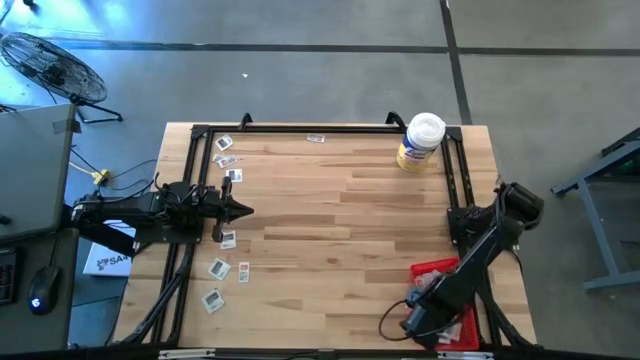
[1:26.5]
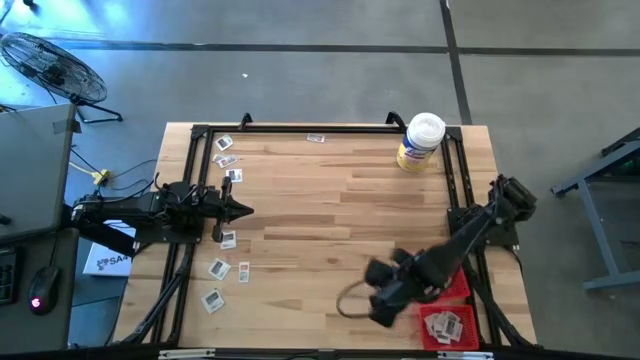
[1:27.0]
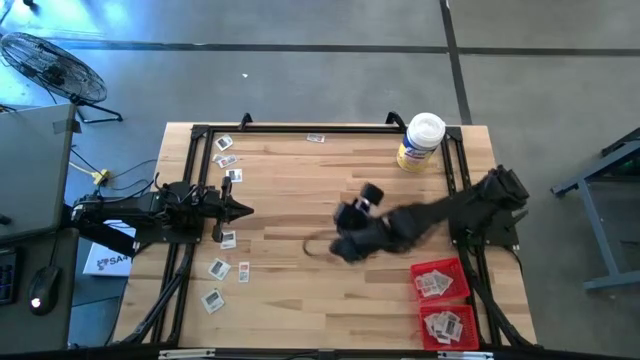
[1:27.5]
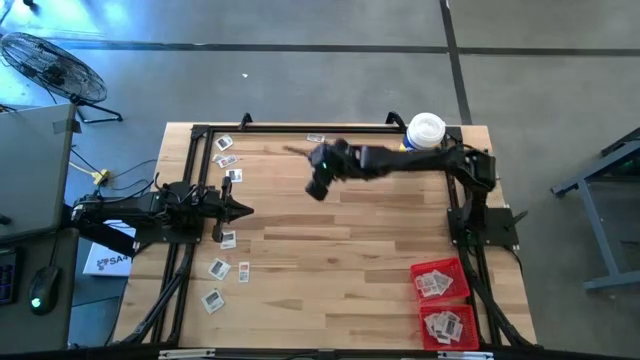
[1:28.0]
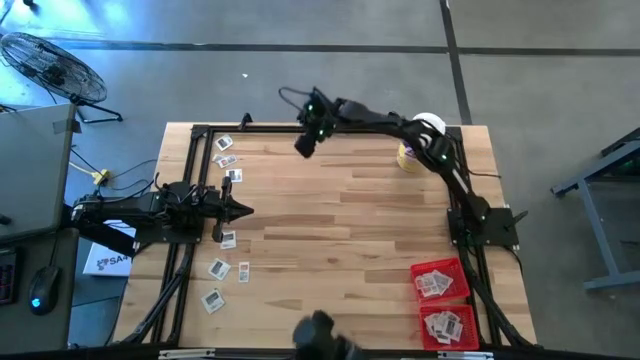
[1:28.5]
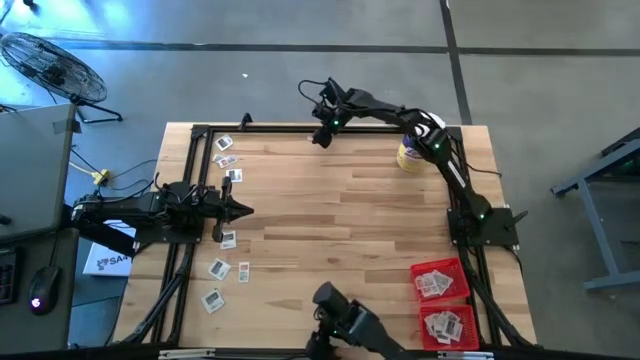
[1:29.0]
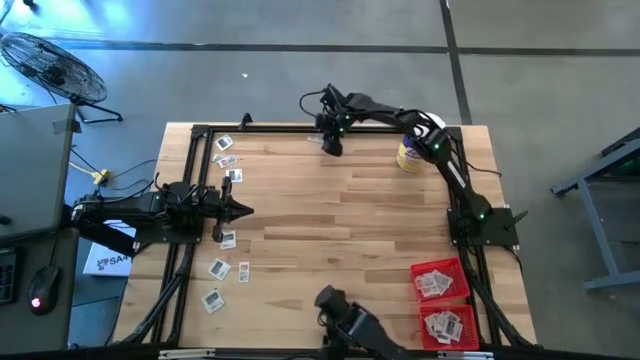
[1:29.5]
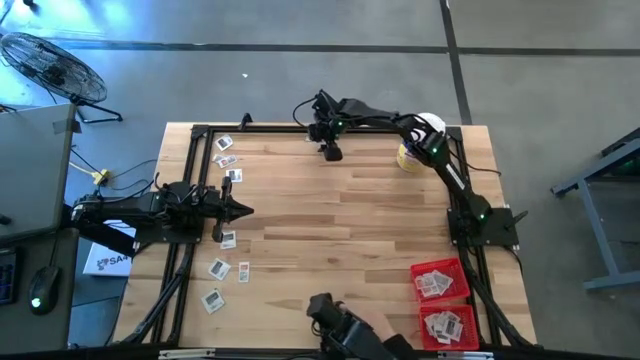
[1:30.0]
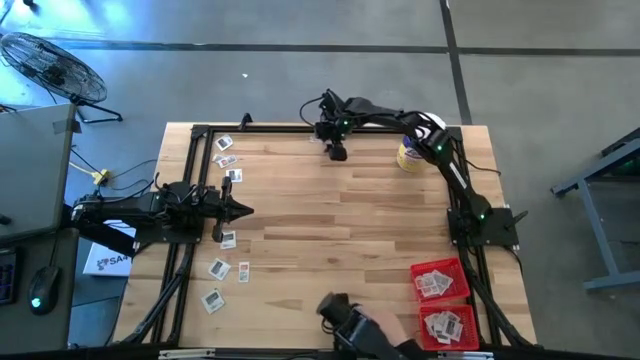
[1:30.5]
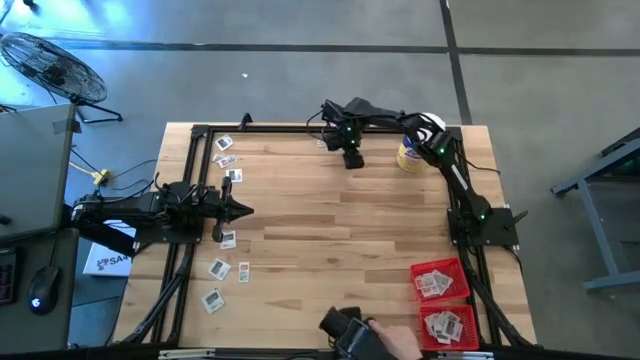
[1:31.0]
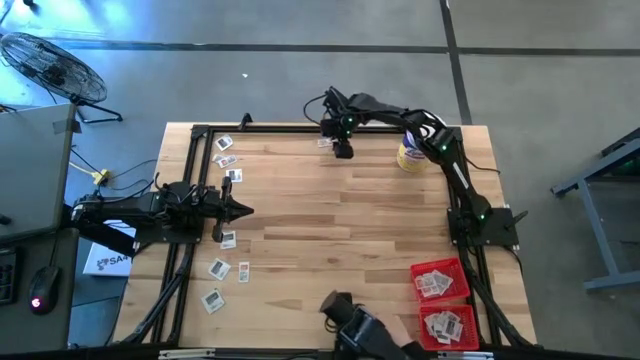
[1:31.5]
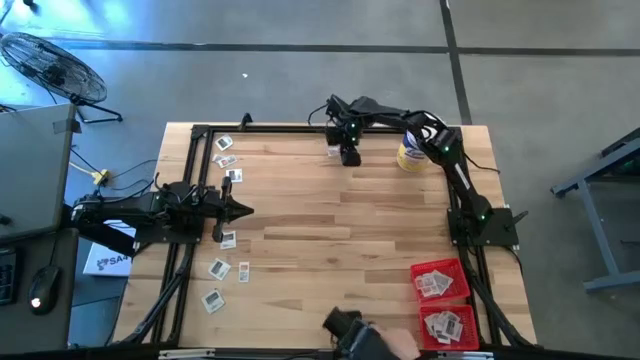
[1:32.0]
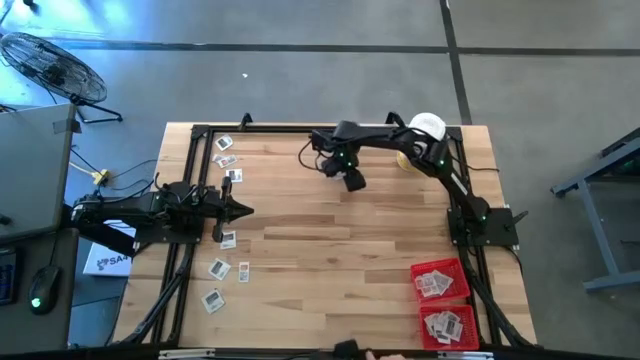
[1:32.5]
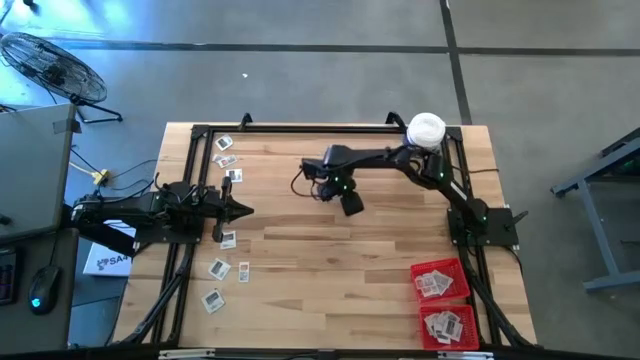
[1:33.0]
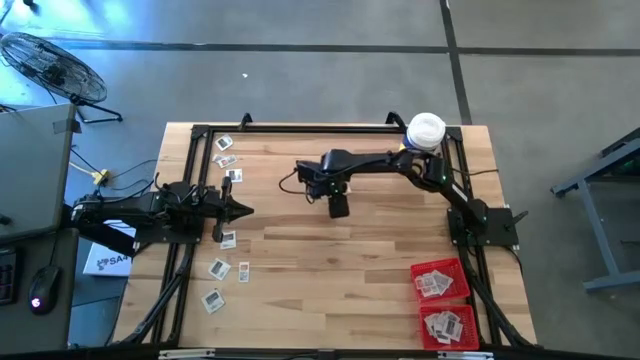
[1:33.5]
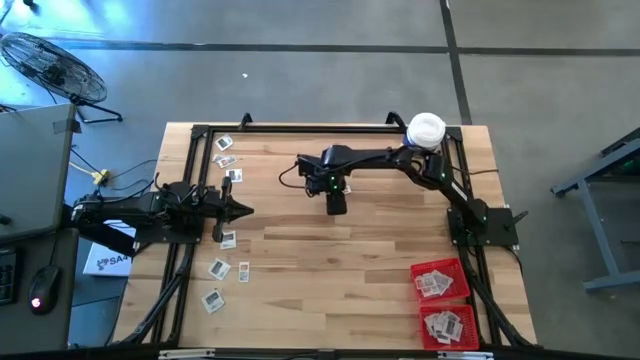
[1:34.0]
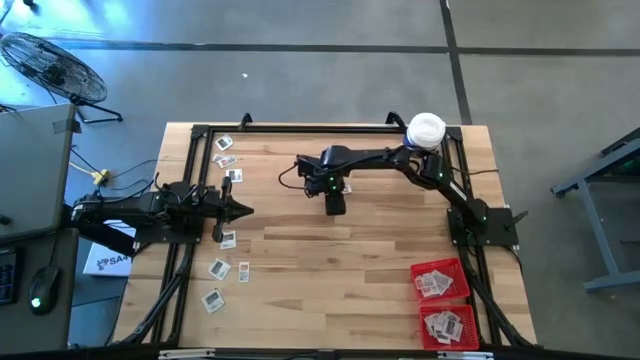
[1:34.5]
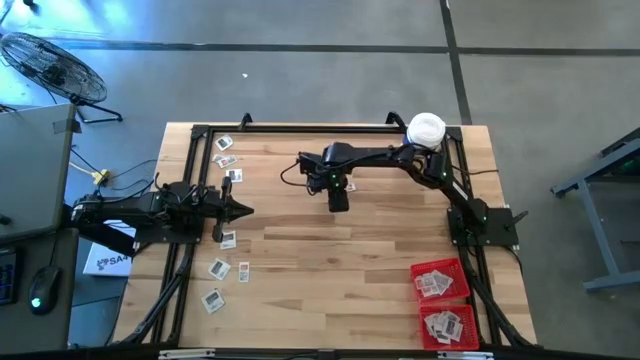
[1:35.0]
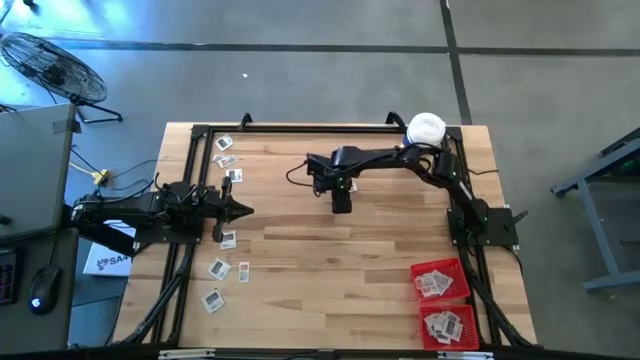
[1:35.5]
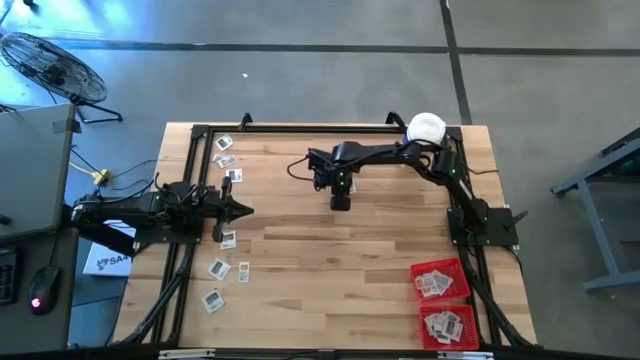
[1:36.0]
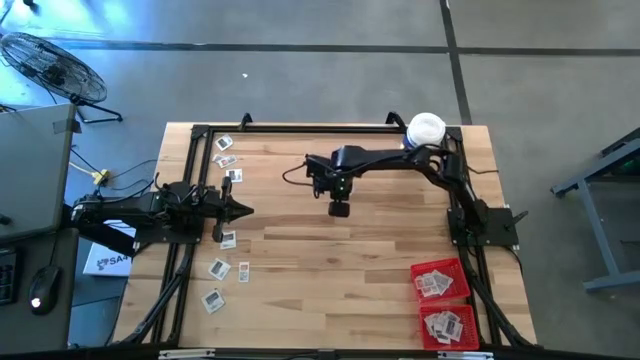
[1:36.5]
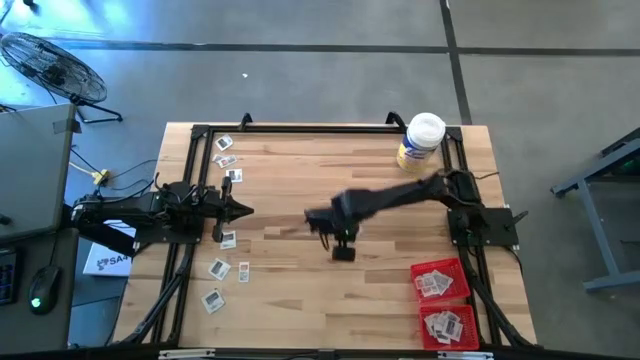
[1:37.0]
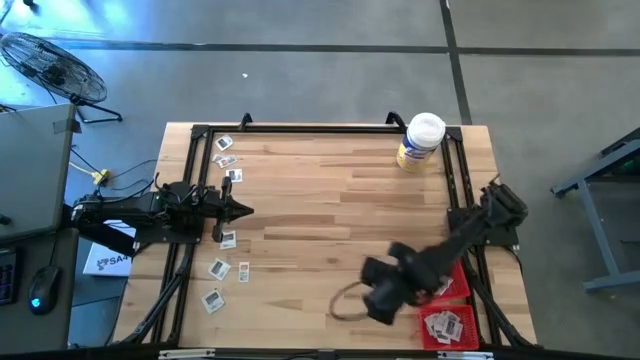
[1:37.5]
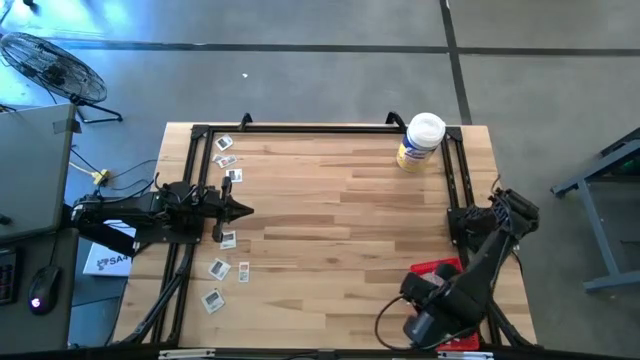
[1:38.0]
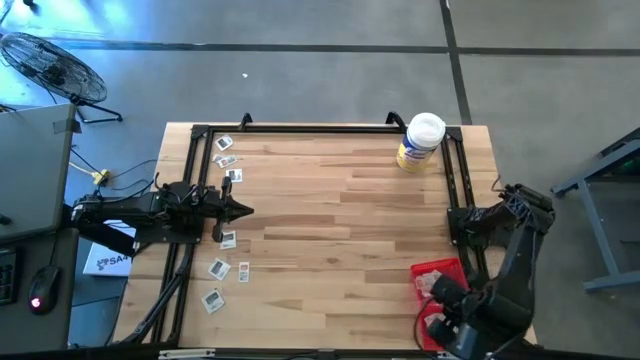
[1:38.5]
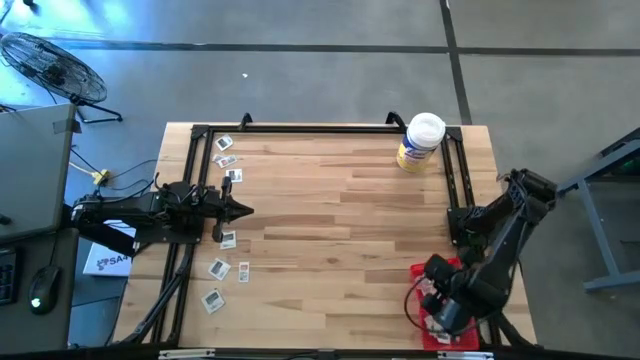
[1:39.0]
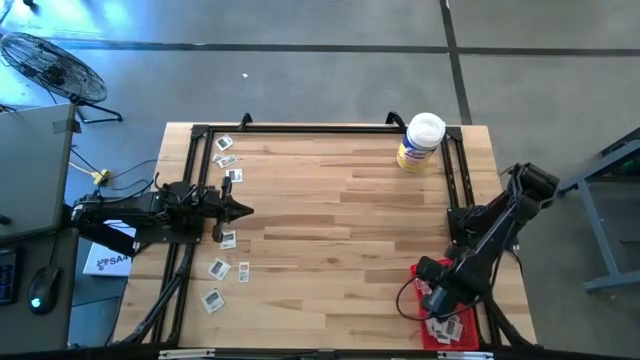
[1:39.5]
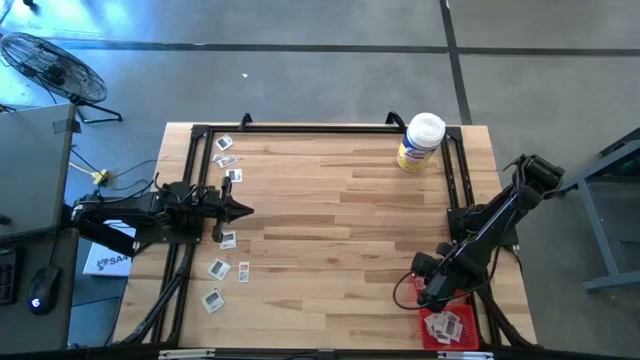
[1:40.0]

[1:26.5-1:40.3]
Task: Pick & Place First Aid Supplies
Put the white ointment pack into the top red bin

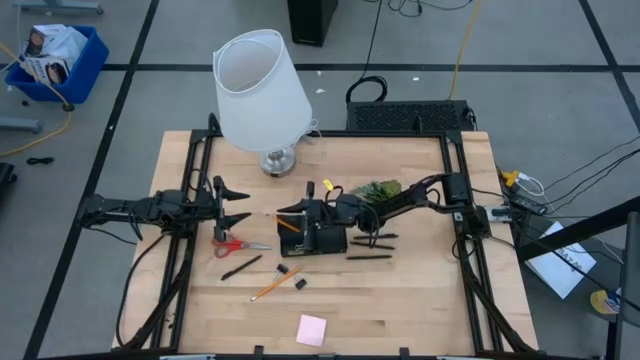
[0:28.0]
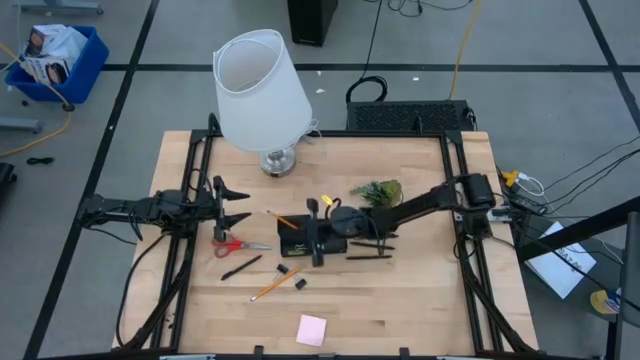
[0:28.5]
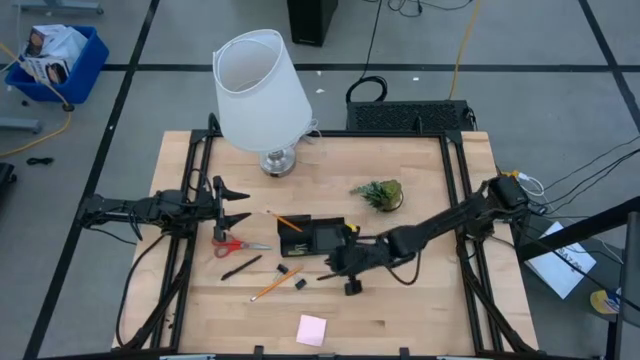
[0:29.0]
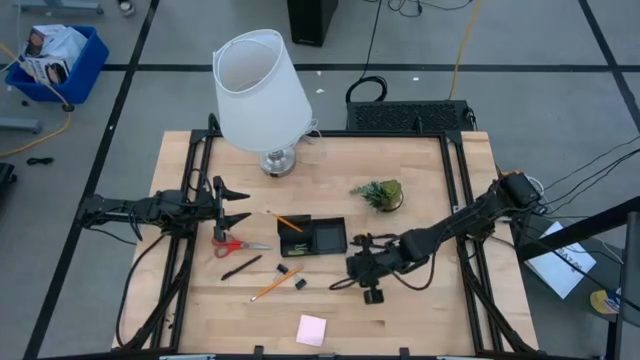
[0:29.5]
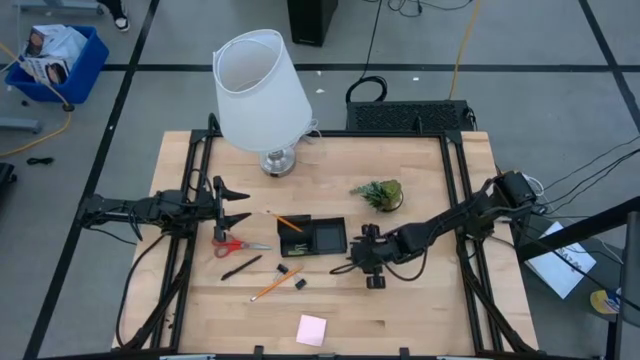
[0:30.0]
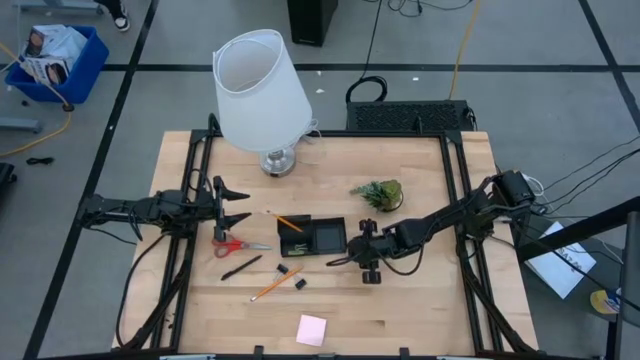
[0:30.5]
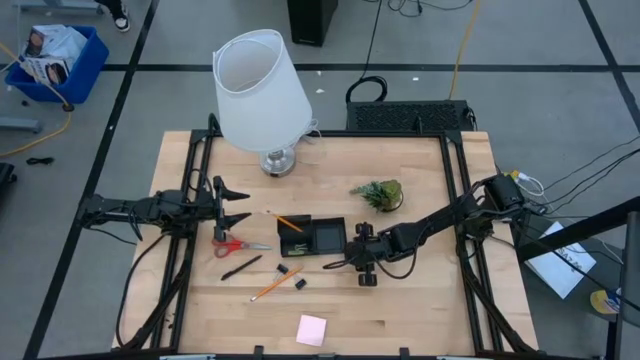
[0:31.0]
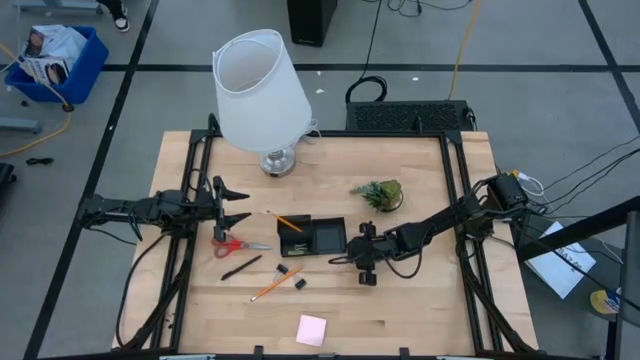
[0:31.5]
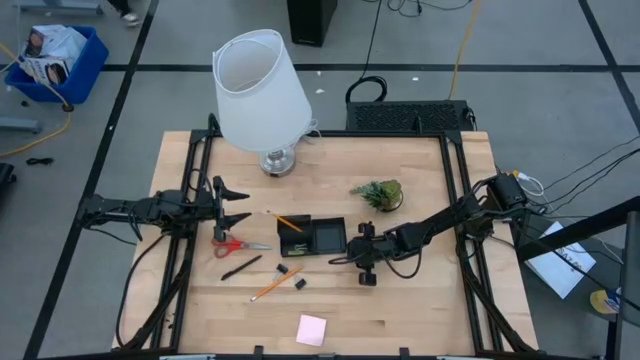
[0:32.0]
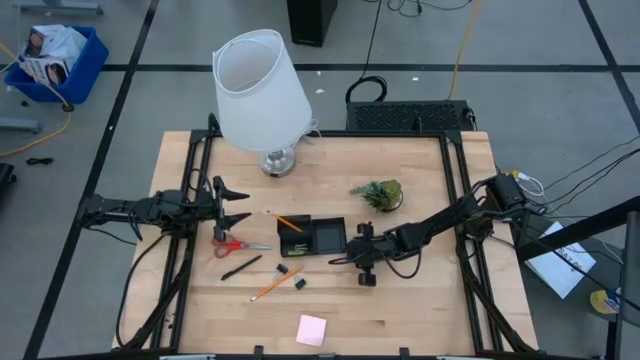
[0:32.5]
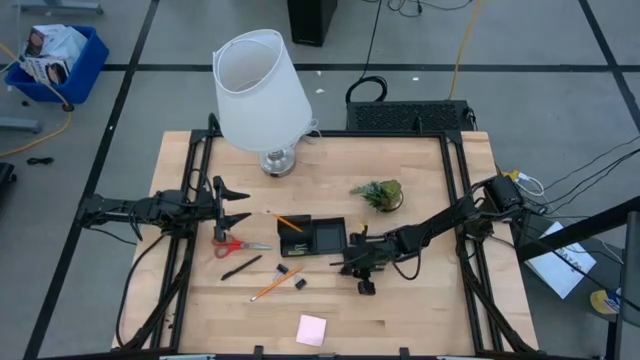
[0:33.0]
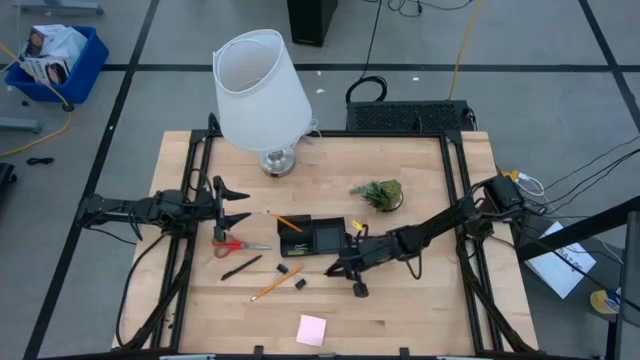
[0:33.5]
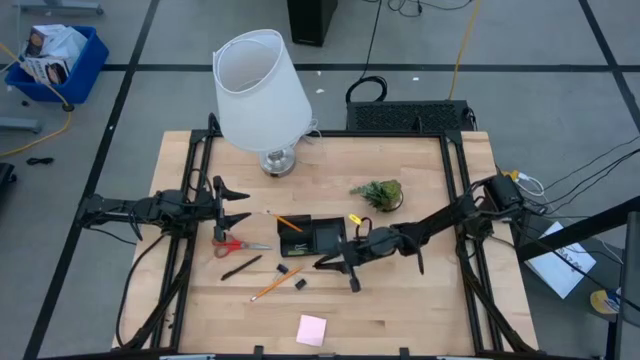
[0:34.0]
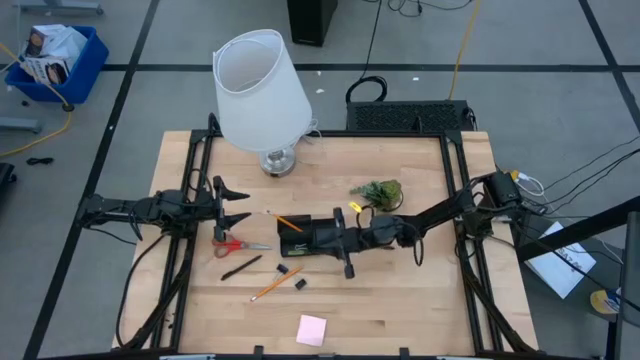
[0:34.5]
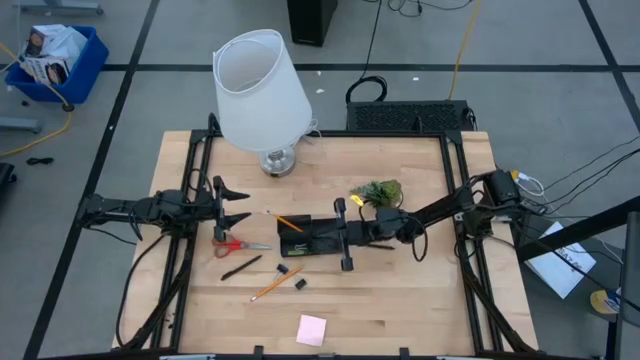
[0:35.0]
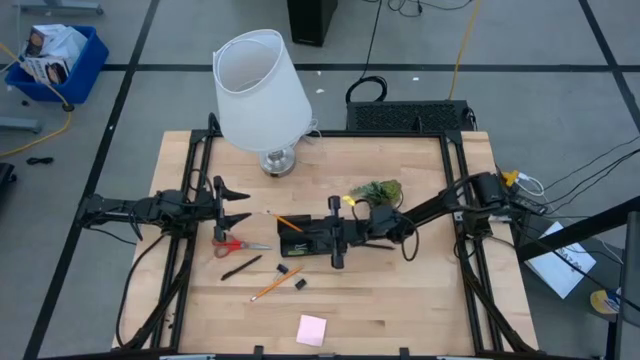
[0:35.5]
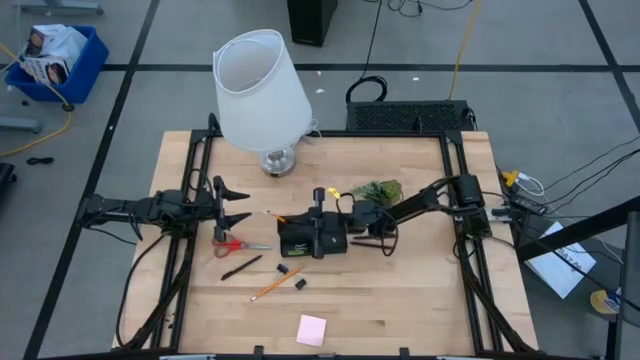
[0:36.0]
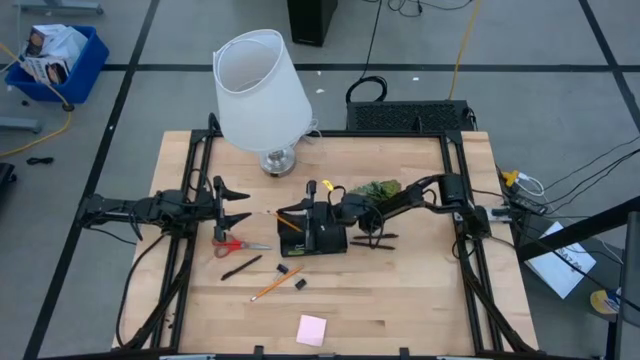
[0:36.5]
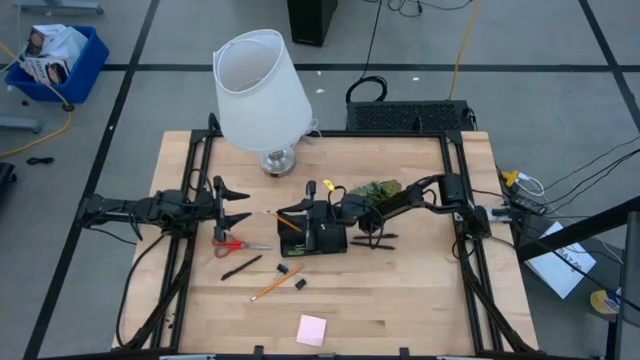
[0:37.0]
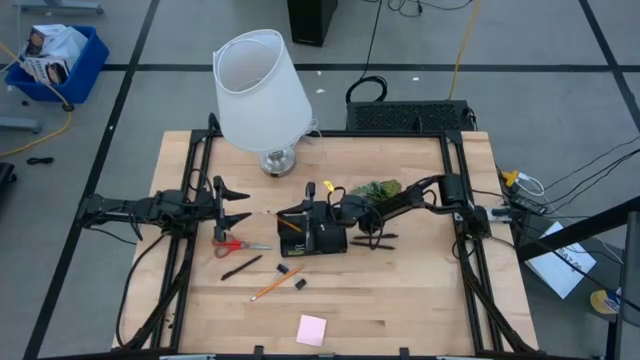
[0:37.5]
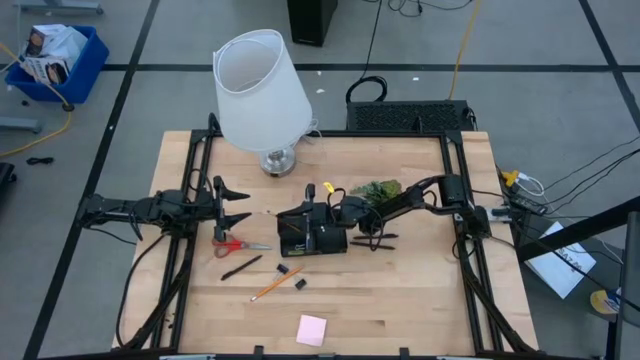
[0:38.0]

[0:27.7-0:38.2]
Task: Pick and place office supplies into organizer
Put the black pen into the black desk organizer
